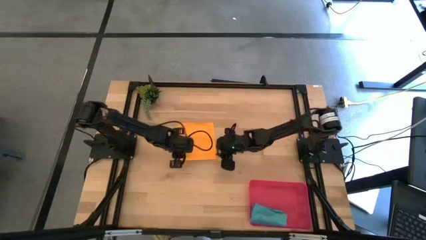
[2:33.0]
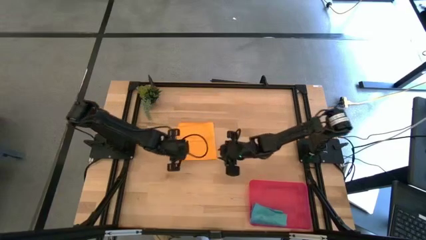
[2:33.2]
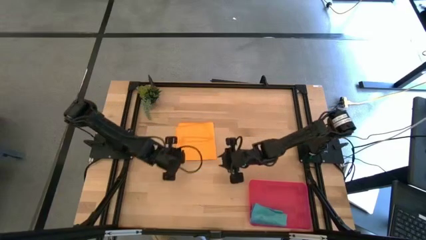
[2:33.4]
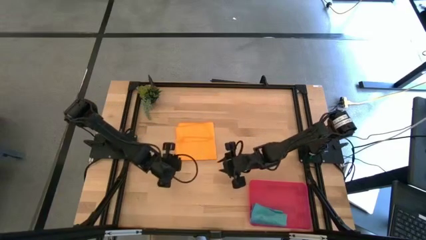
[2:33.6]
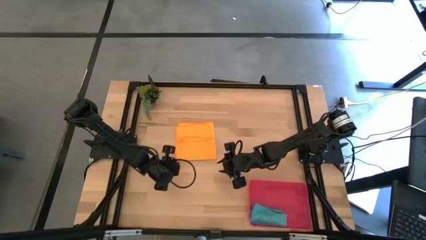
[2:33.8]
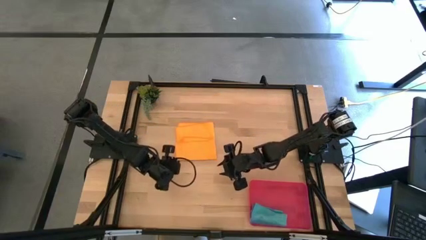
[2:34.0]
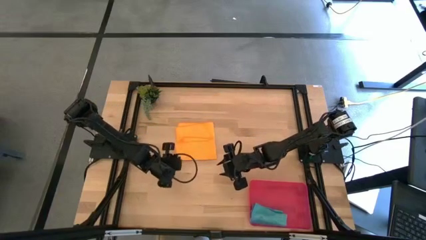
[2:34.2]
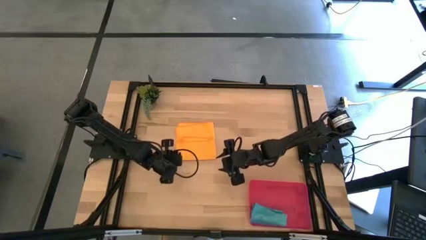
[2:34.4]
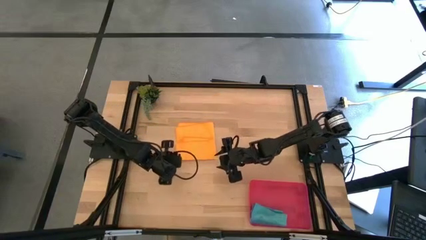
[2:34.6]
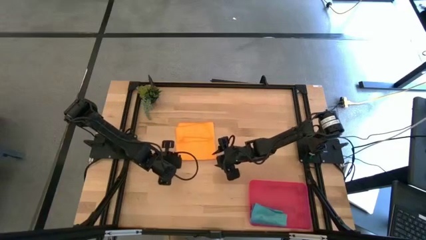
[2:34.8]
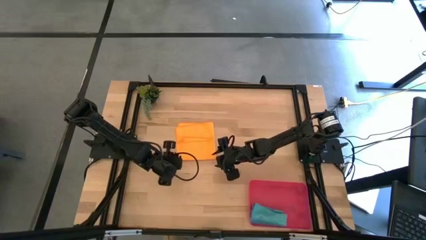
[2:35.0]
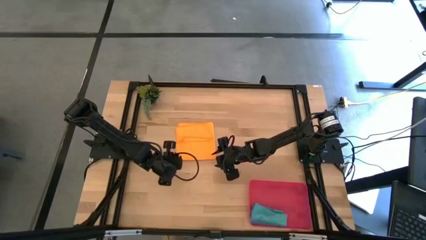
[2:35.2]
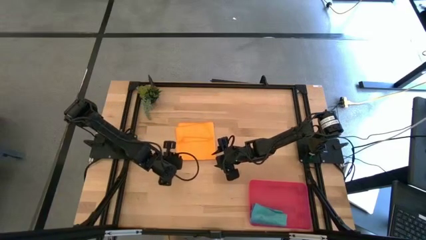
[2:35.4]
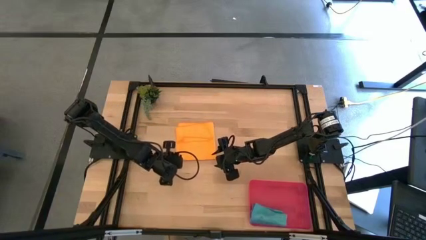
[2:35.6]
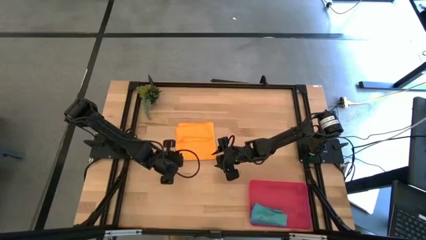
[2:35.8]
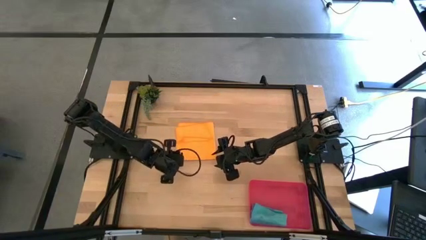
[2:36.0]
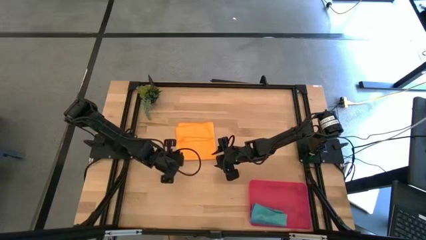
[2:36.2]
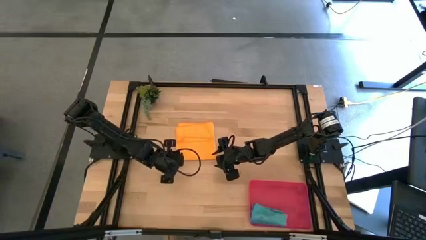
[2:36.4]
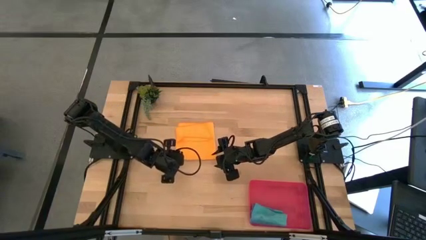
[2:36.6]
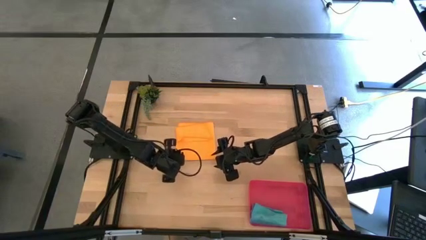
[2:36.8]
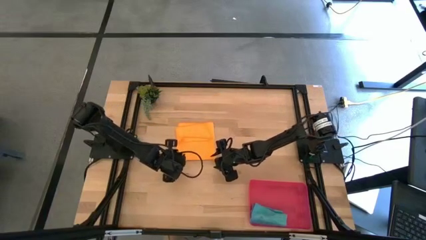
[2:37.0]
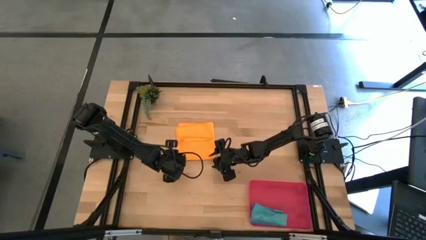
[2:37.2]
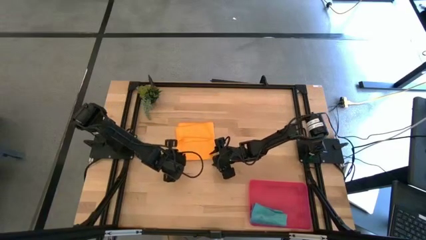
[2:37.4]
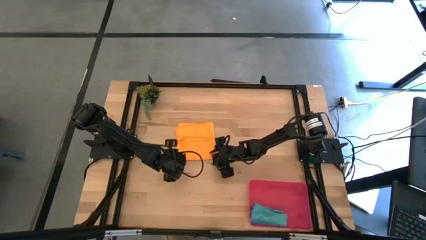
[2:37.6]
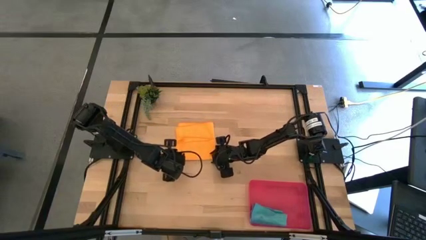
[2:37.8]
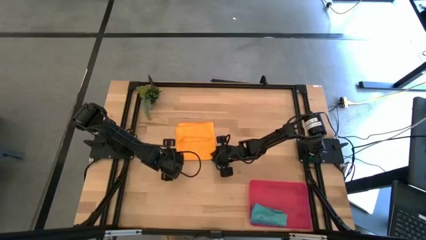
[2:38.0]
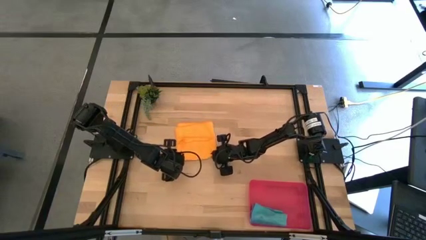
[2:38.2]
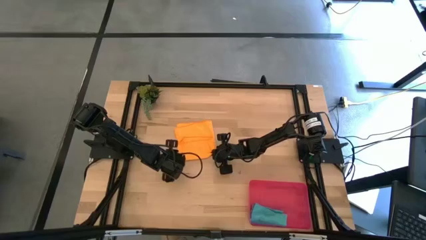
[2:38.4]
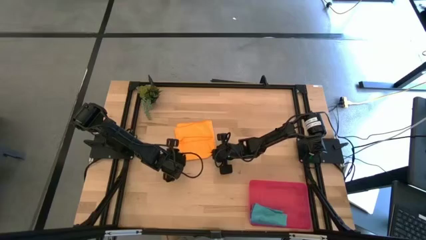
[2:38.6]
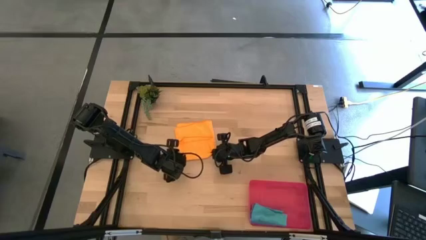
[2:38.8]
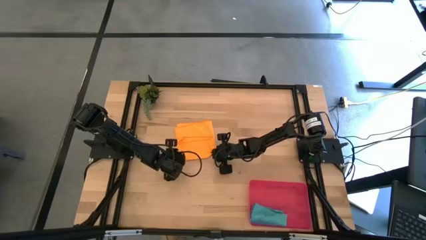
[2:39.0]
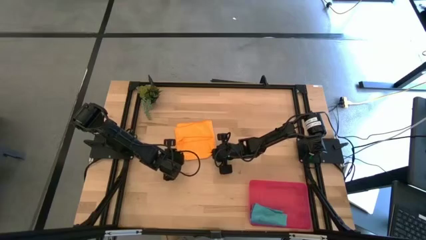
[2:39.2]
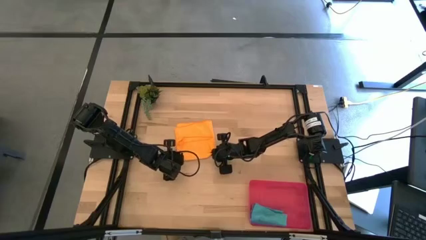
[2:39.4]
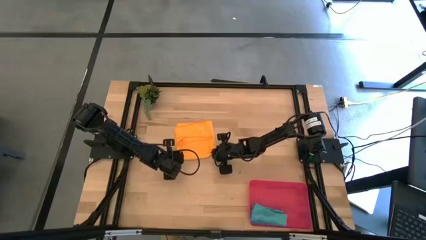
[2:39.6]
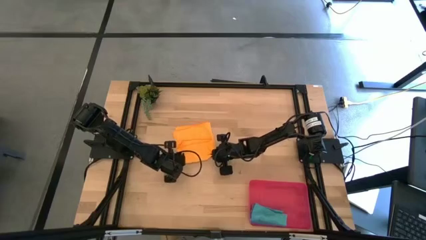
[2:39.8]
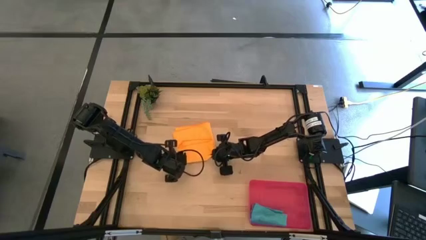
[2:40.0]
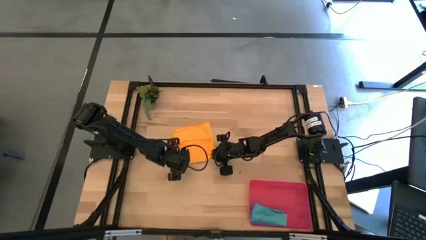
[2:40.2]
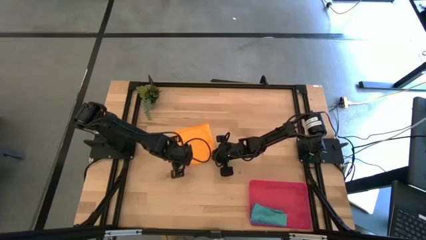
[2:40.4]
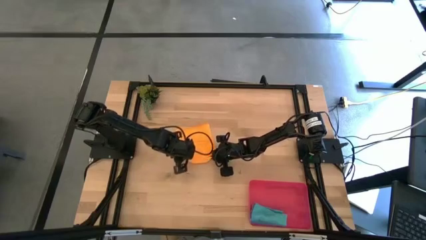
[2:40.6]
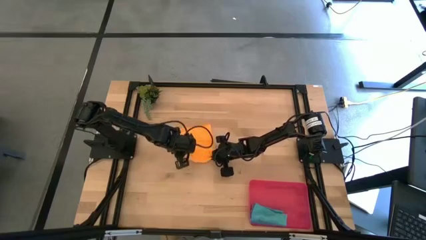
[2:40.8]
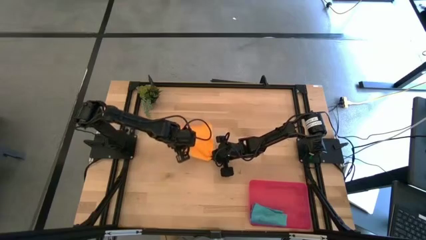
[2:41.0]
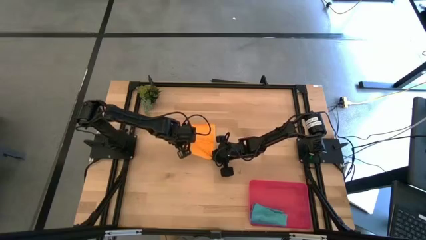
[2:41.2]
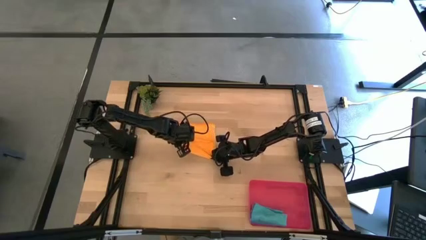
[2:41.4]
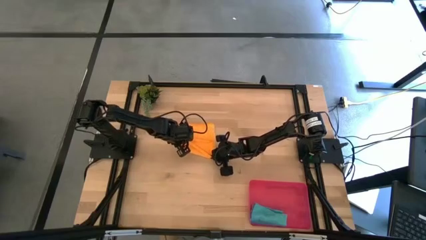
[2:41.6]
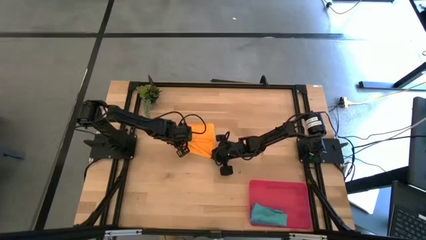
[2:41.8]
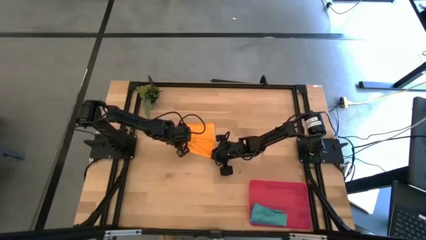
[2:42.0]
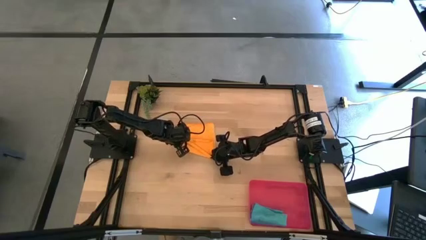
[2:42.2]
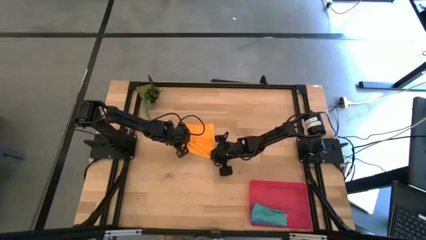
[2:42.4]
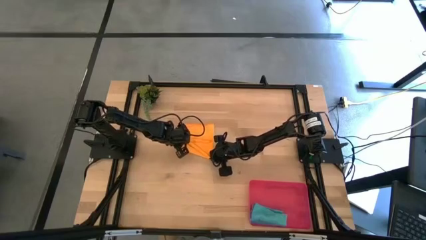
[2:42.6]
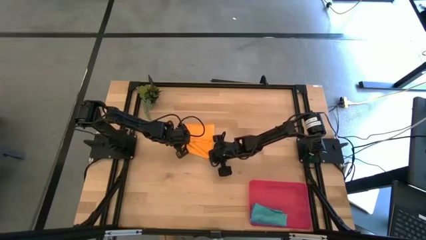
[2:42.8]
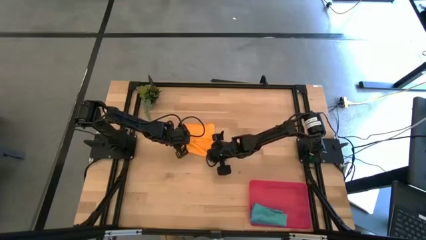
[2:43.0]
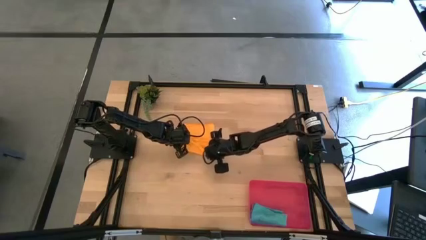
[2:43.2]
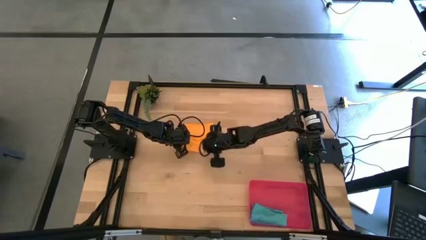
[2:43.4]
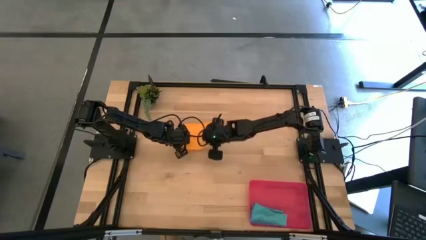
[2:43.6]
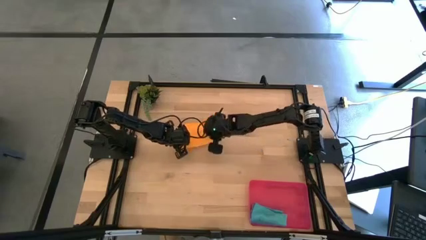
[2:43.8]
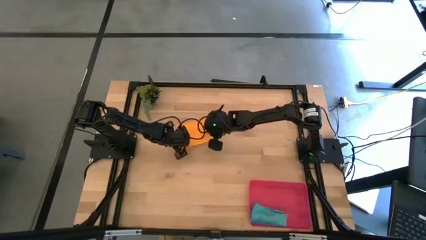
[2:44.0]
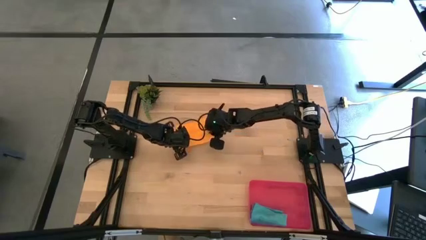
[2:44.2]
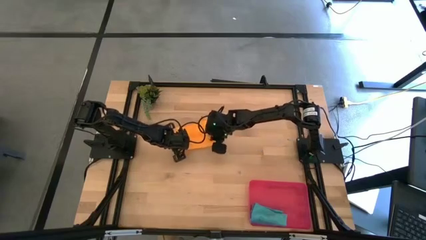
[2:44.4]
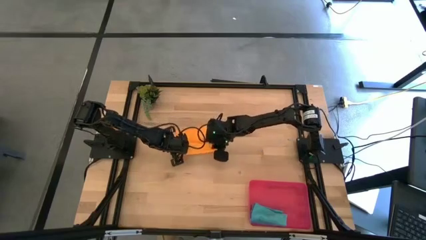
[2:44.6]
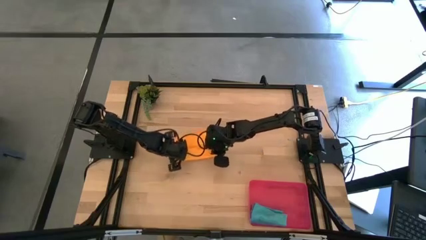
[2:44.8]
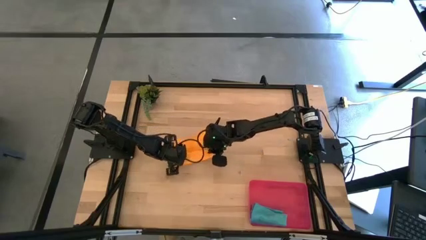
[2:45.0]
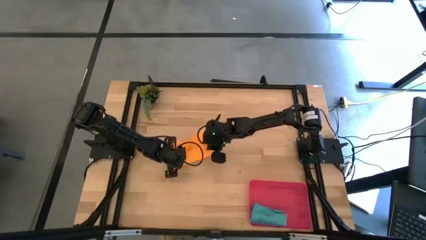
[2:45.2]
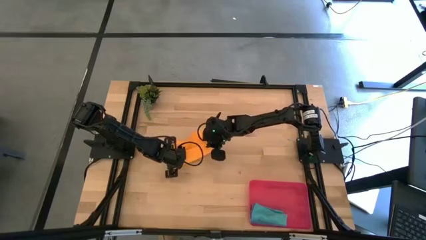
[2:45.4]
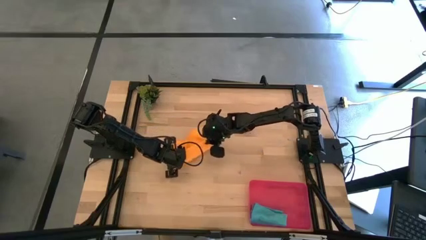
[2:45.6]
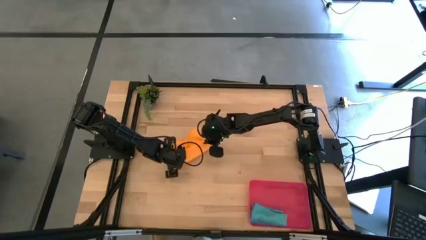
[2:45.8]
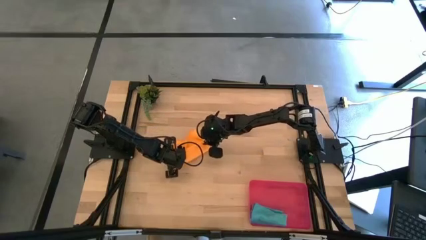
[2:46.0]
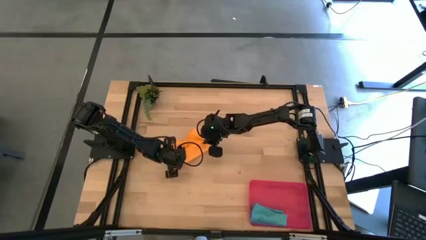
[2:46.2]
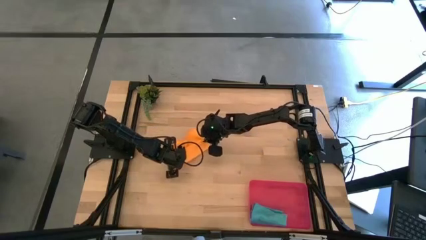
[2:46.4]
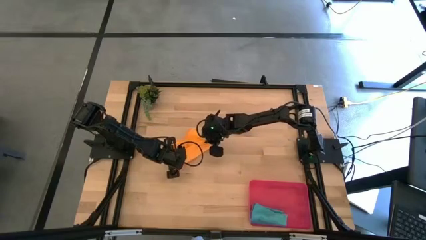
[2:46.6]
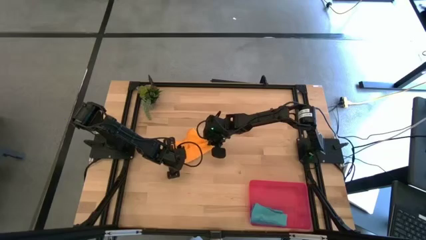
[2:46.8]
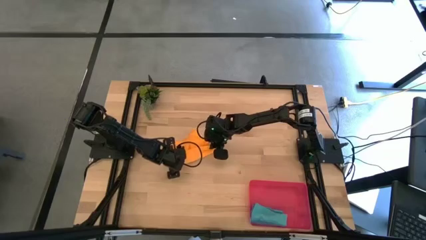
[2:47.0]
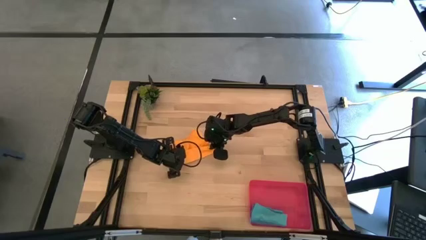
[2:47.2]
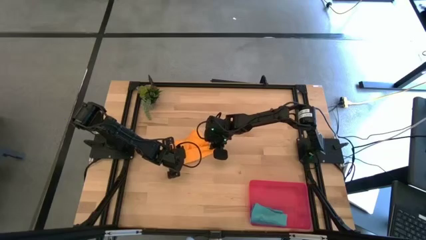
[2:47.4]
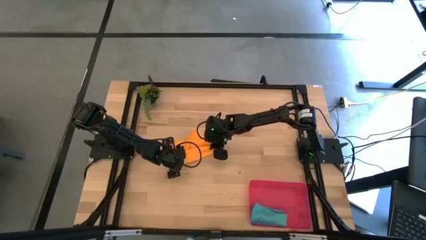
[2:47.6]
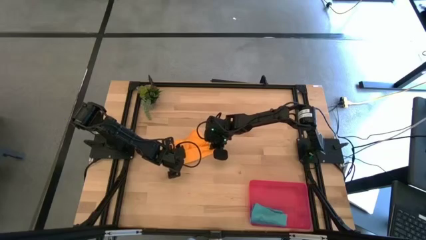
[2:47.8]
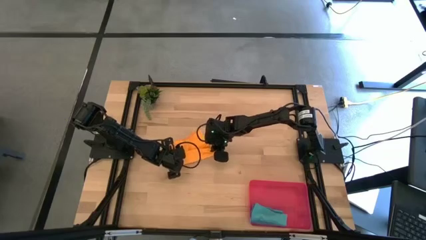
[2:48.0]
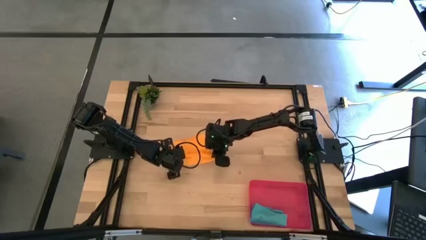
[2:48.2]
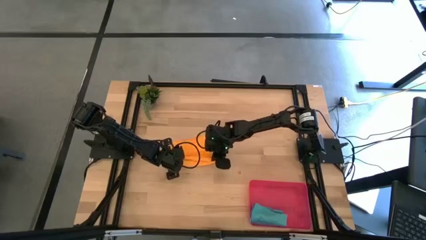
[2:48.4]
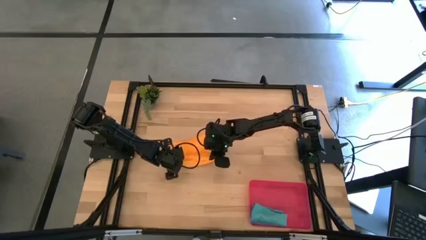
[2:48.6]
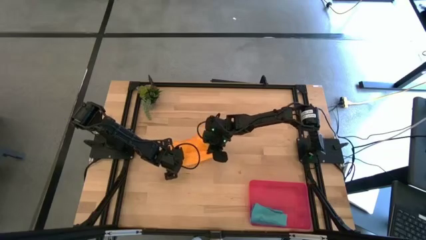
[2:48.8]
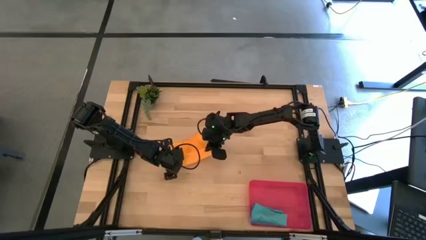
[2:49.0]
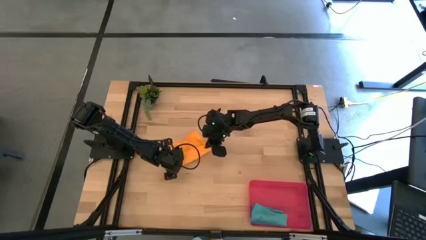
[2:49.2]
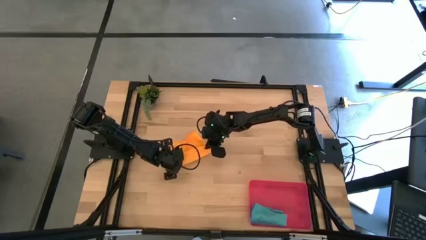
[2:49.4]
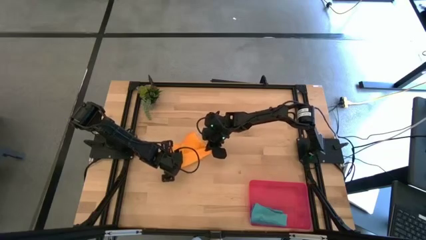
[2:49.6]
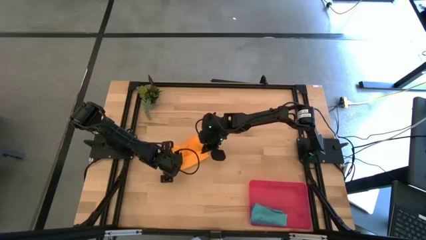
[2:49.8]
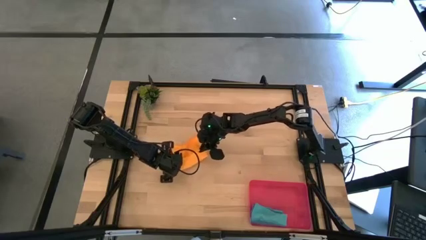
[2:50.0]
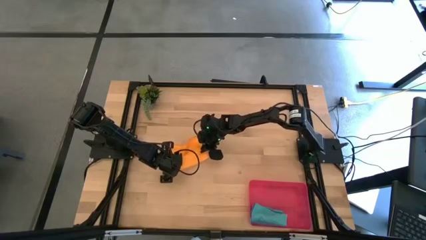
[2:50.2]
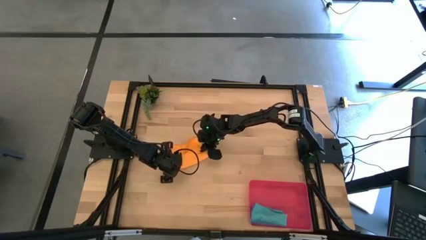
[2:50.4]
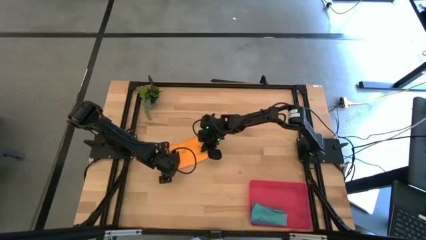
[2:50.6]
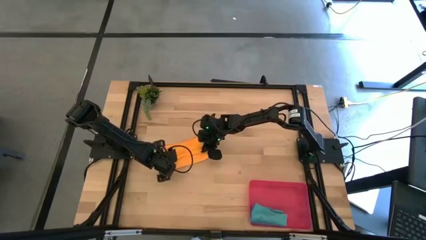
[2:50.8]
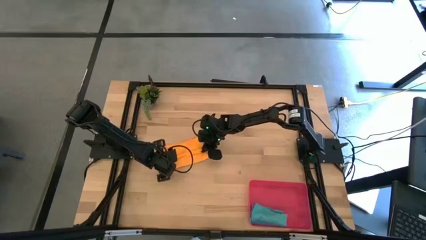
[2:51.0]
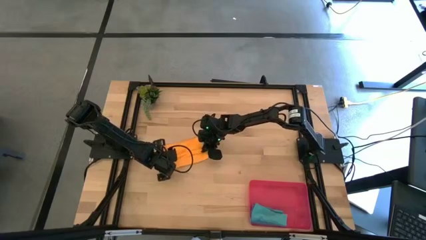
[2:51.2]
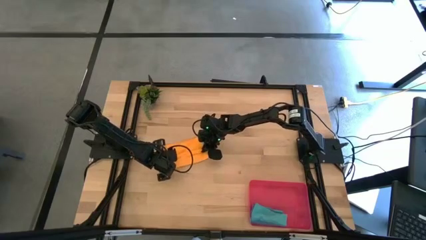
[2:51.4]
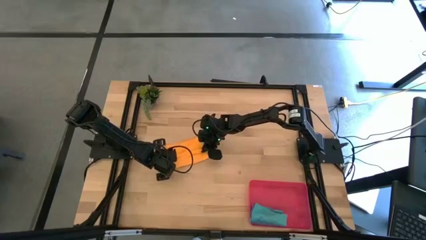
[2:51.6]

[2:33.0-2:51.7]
Task: Roll microfiber towels into tight, uniform cylinder then place into a basket
Roll the orange microfiber cloth
